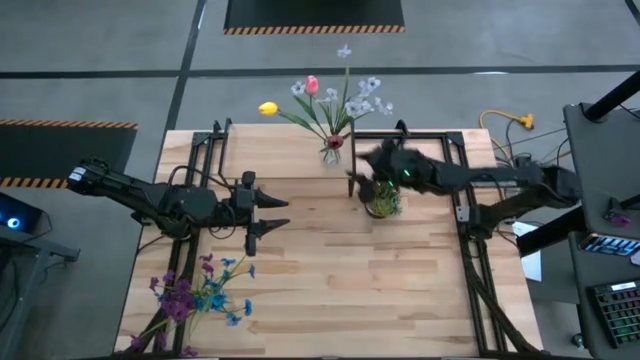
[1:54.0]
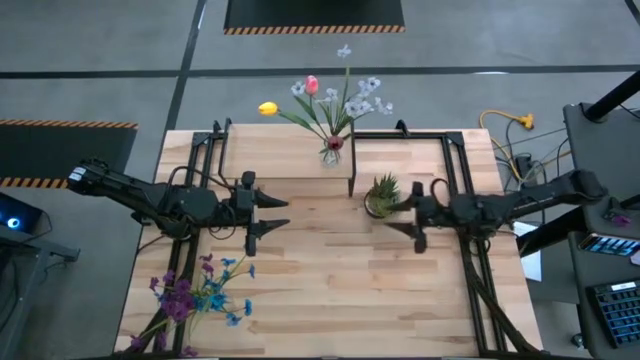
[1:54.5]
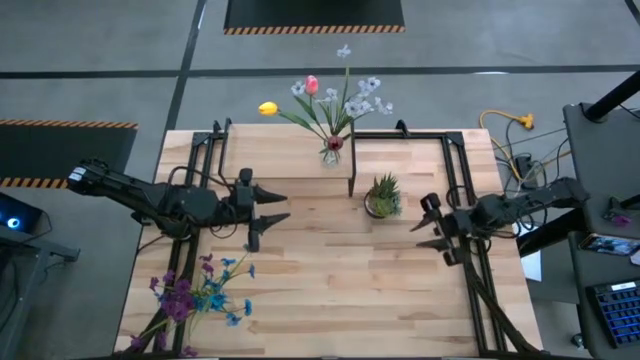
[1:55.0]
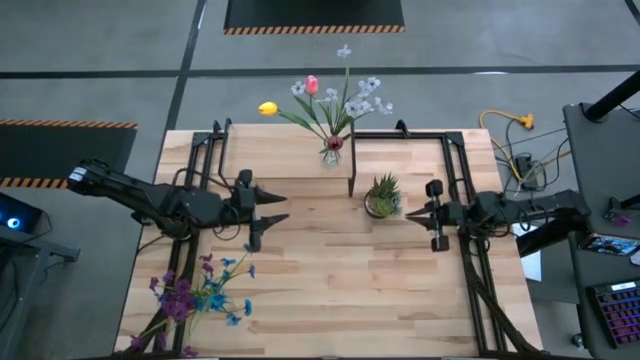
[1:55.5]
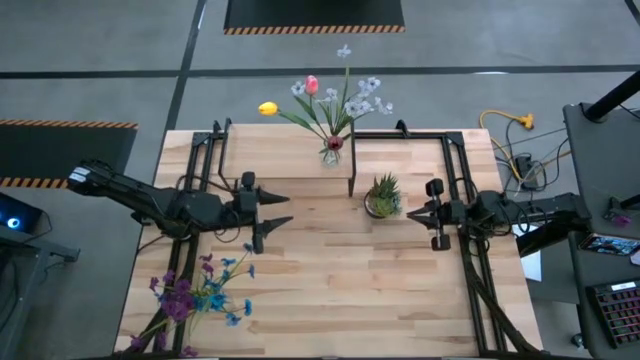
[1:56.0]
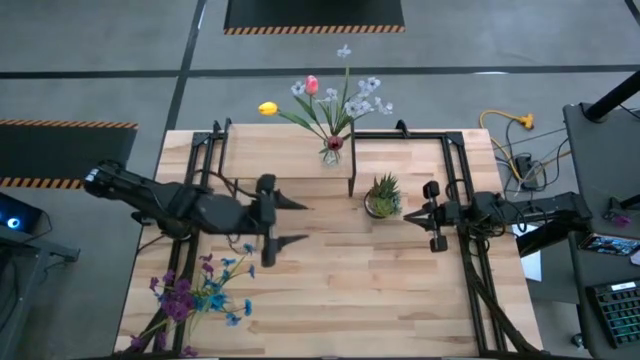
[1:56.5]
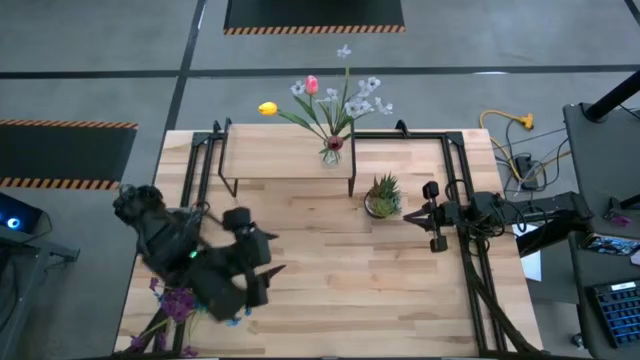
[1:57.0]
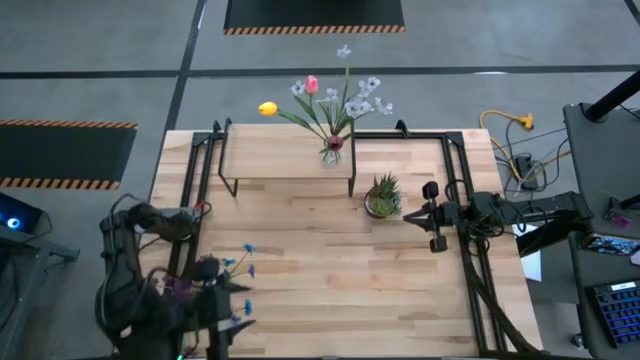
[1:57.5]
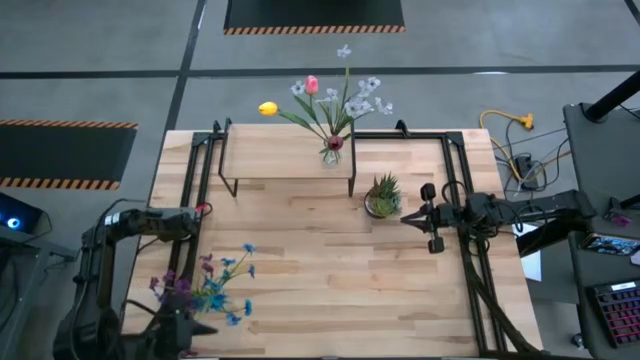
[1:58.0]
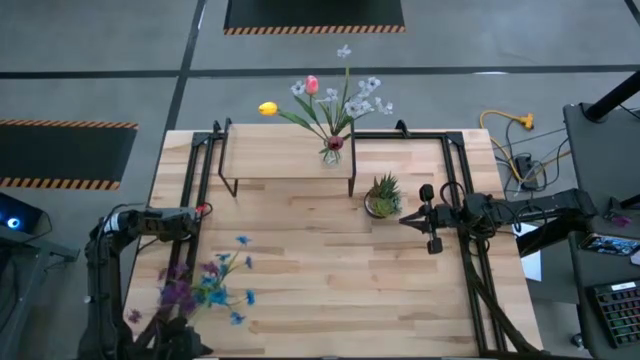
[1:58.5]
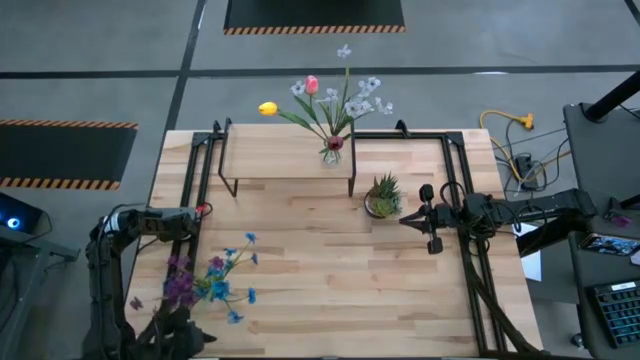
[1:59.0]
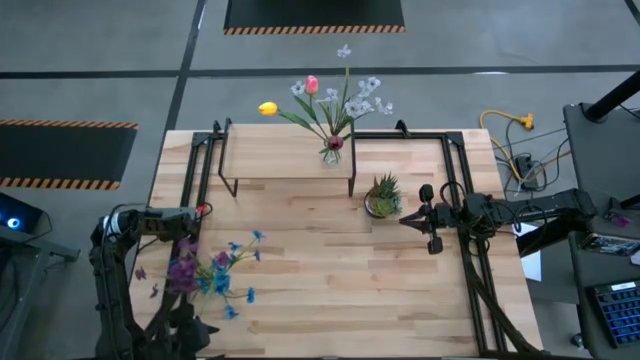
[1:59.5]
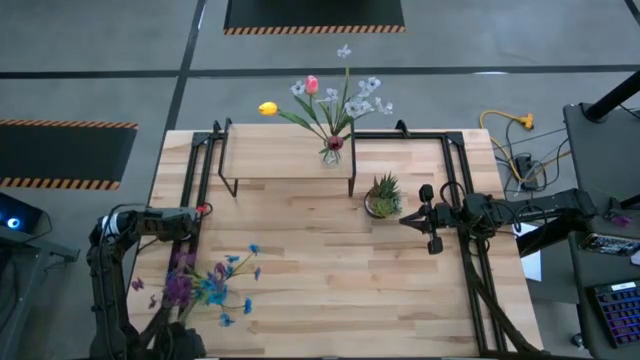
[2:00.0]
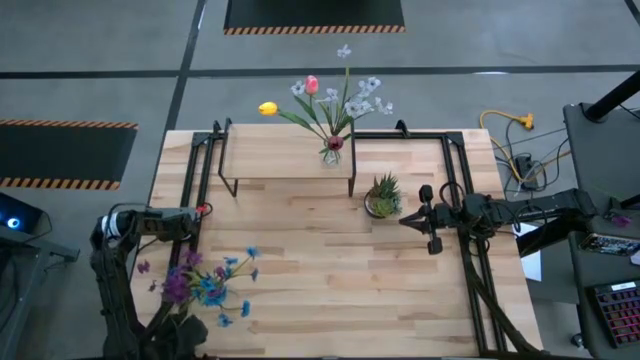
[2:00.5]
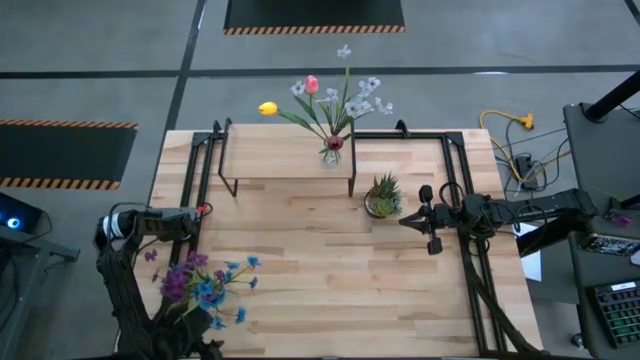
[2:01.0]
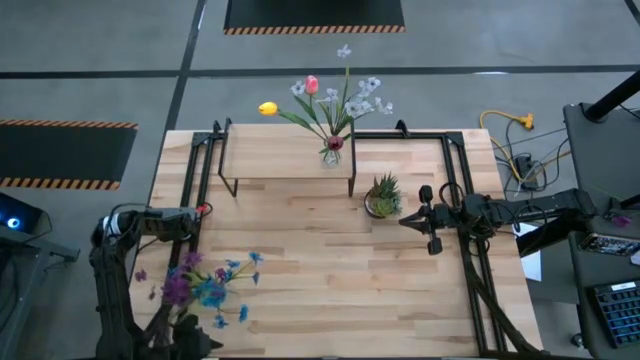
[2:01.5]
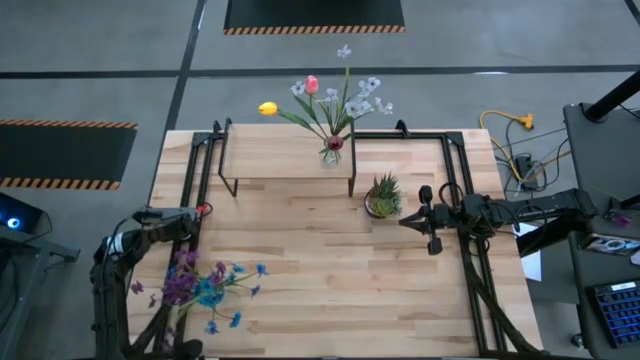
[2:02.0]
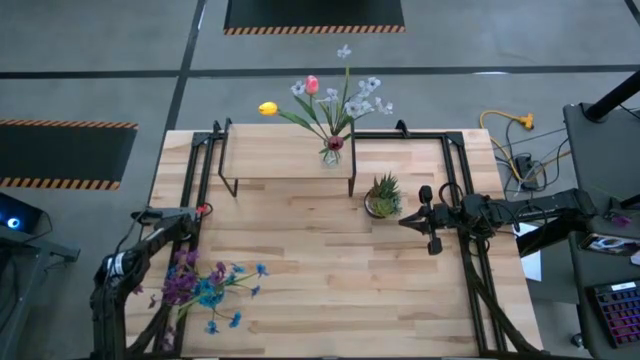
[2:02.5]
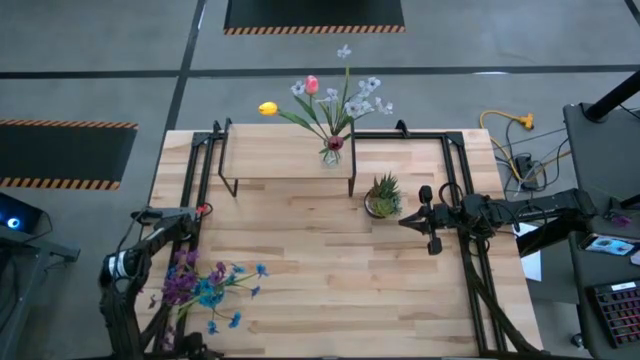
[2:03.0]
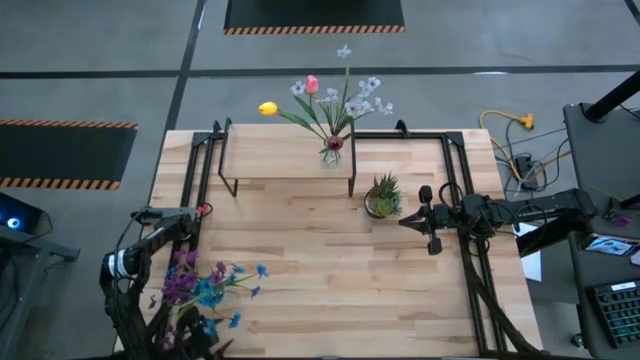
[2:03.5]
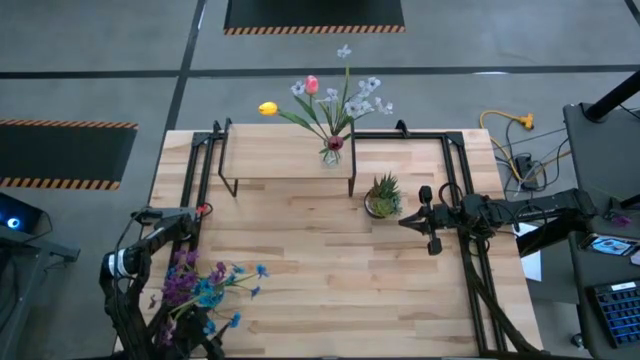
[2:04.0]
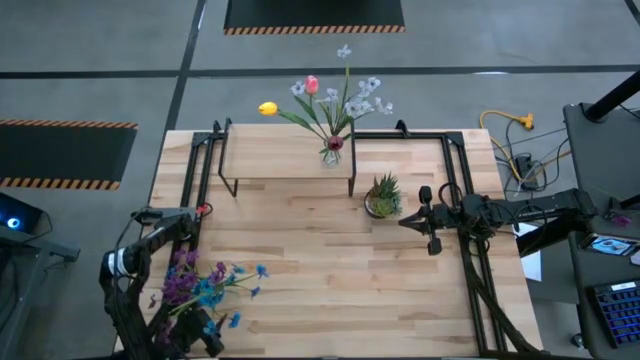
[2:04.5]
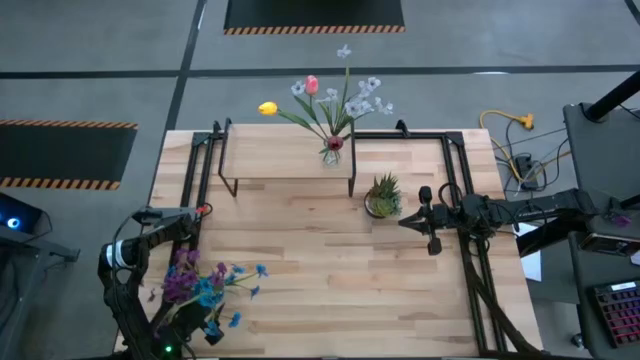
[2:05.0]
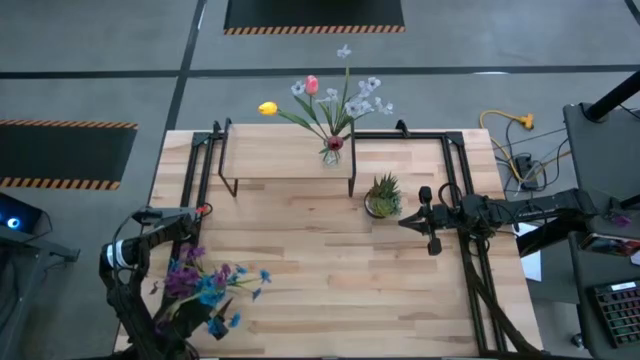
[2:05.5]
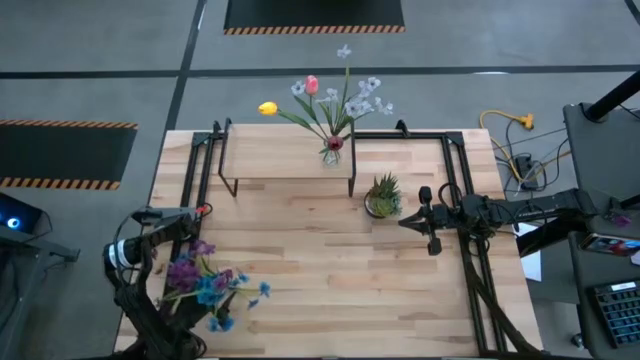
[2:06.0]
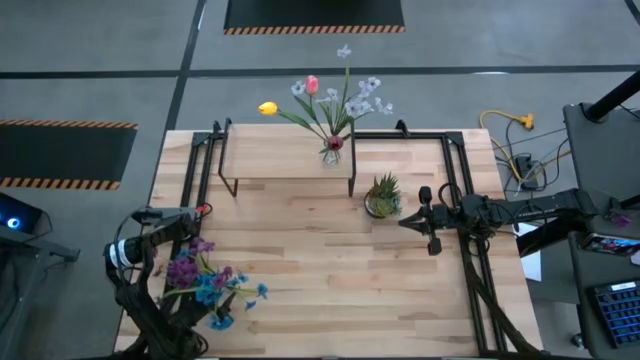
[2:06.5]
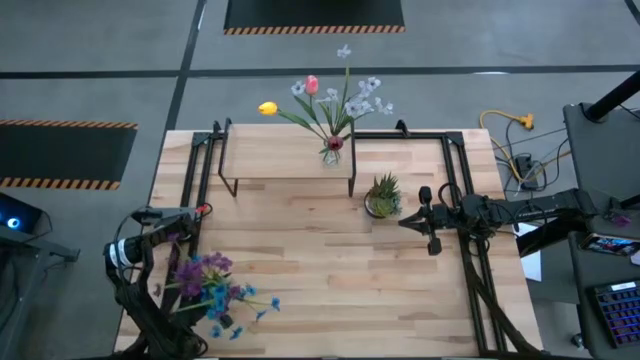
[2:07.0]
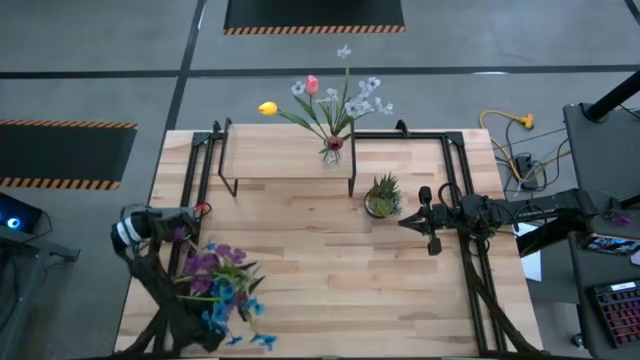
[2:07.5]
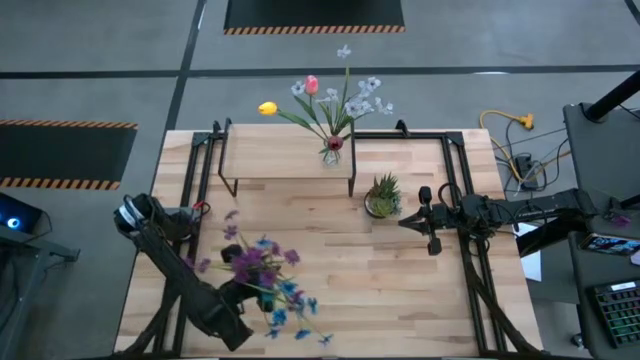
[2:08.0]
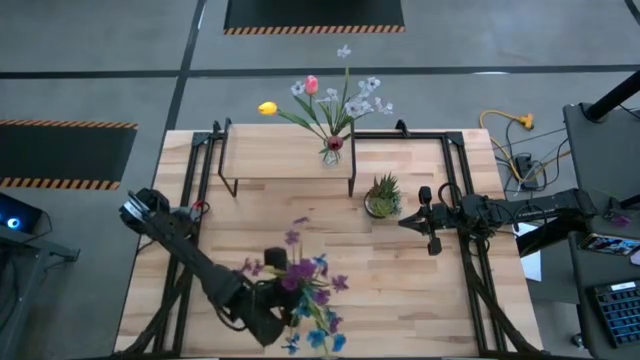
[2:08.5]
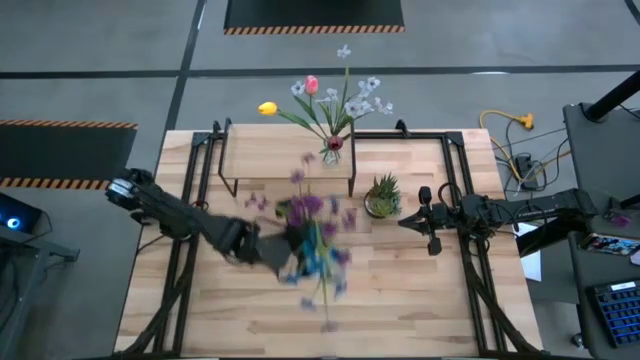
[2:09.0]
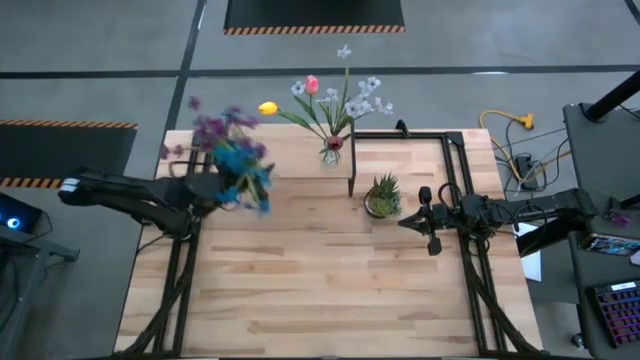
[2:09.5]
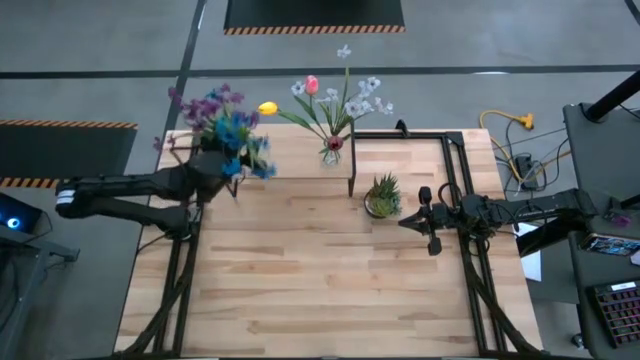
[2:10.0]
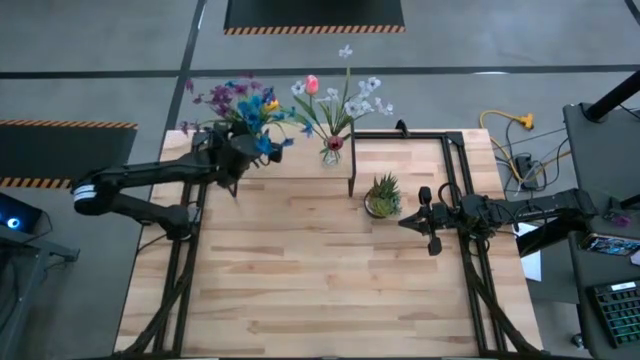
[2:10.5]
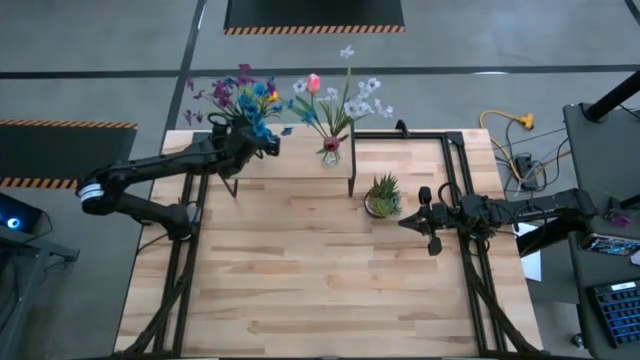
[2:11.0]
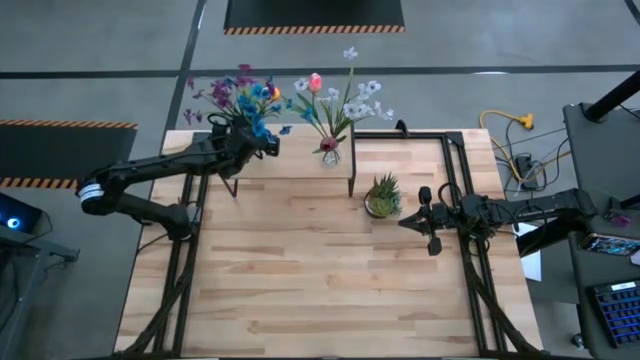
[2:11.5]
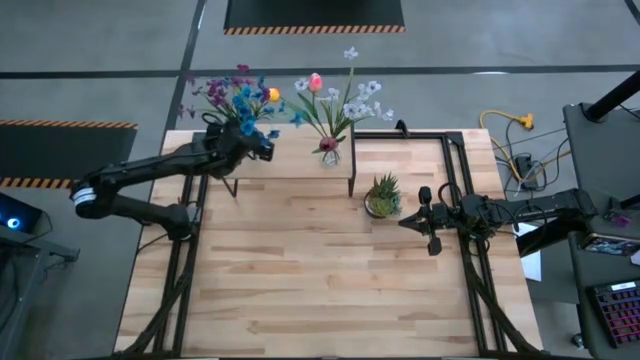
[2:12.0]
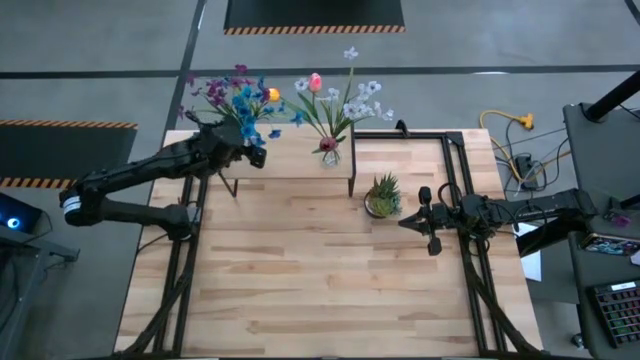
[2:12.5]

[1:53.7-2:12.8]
Task: Pick and place flowers into a vace then onto a shelf
Put the transparent flower vase on the shelf

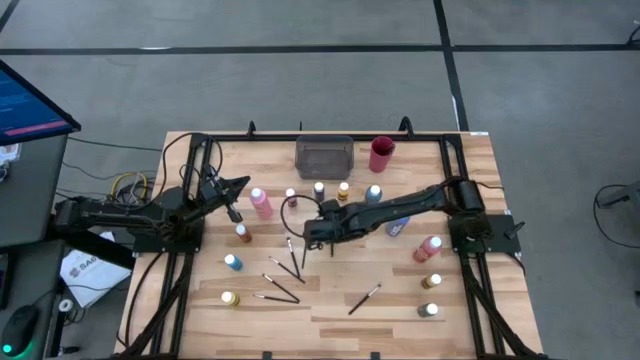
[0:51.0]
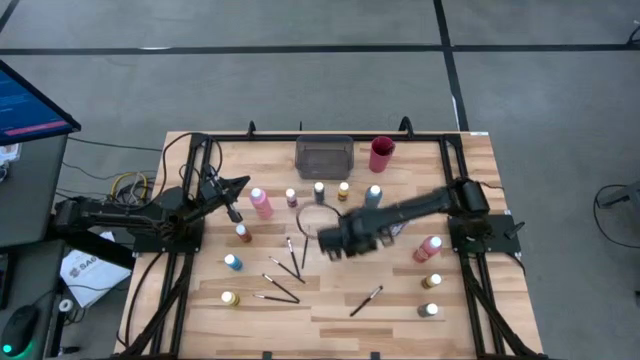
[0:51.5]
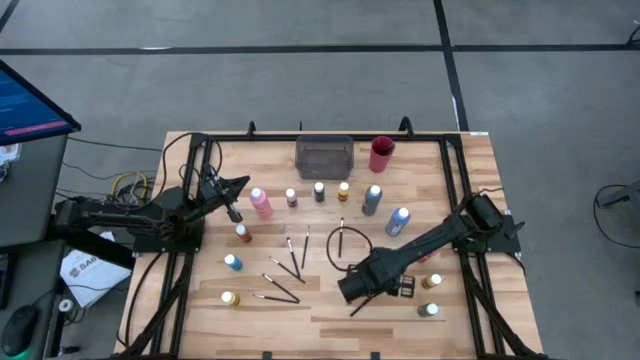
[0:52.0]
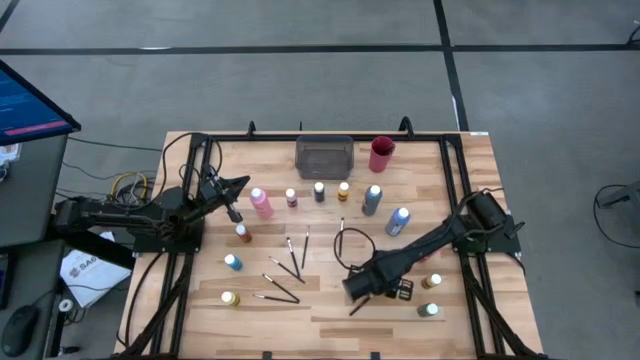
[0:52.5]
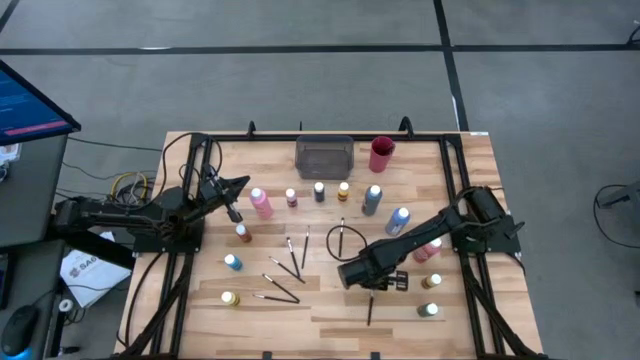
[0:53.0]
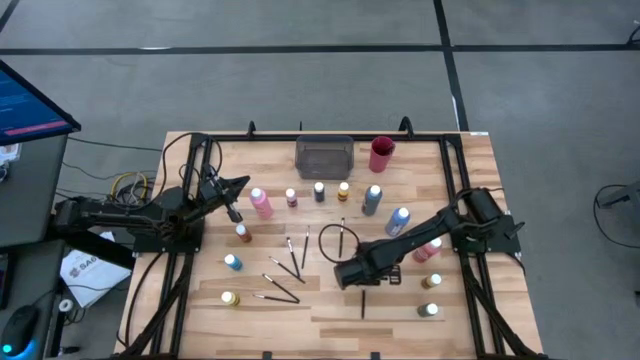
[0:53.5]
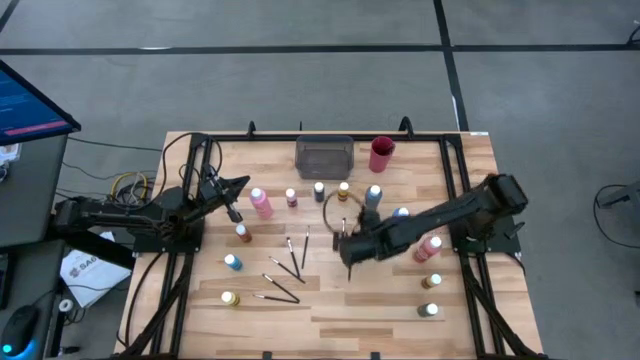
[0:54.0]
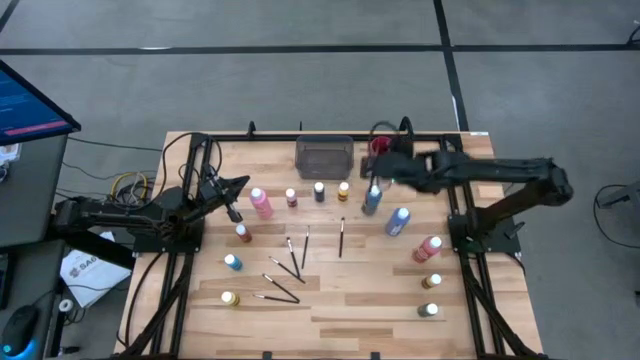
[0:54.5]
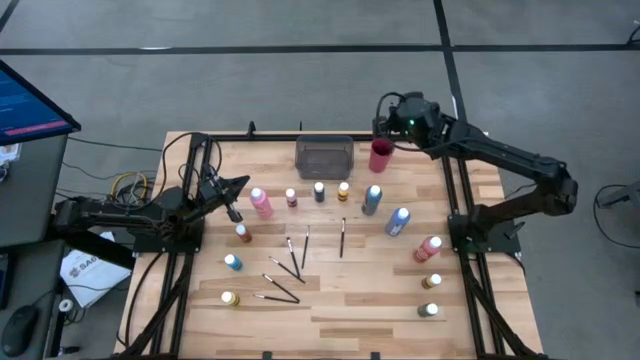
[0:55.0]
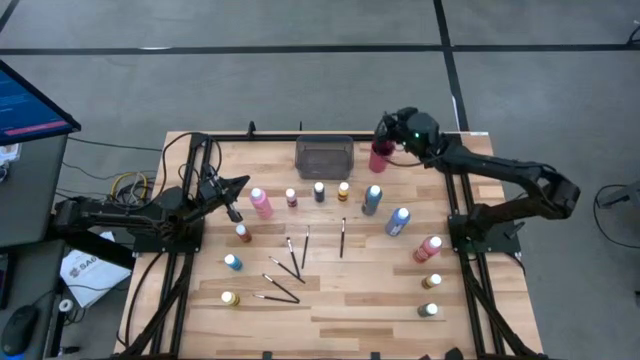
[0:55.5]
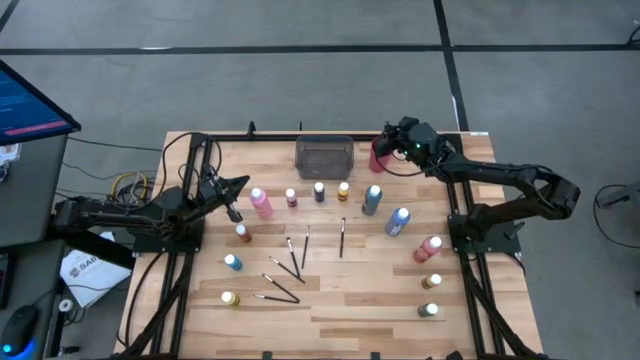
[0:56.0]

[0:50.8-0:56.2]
Task: Pick & Place Paint Supplies
Put the black paintbrush into the red cup
